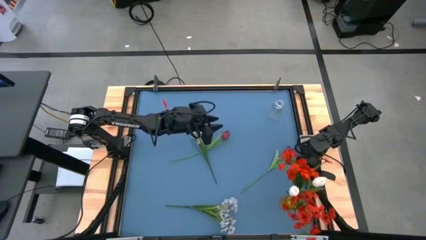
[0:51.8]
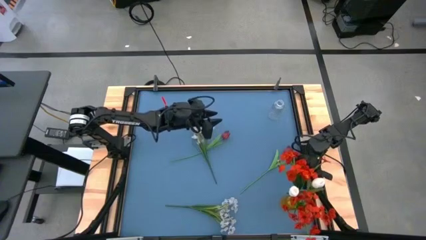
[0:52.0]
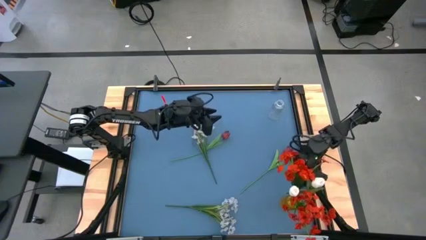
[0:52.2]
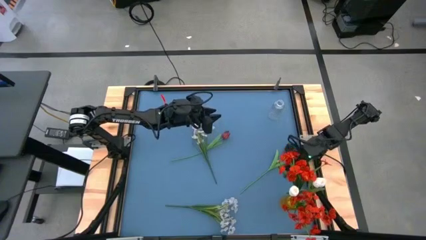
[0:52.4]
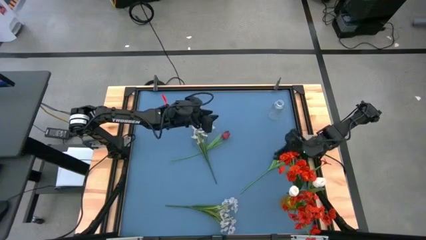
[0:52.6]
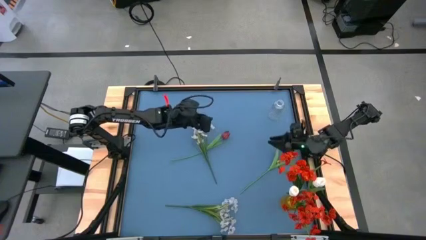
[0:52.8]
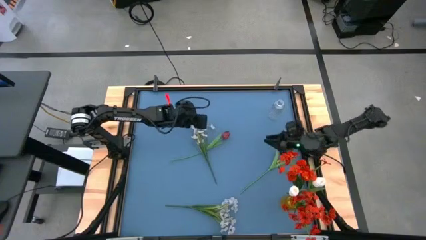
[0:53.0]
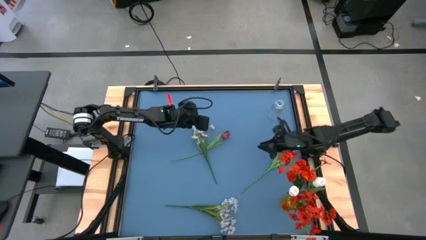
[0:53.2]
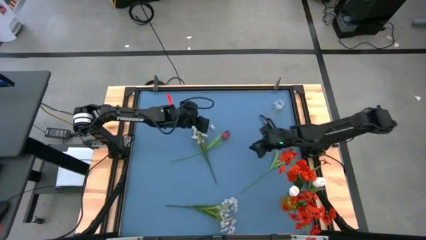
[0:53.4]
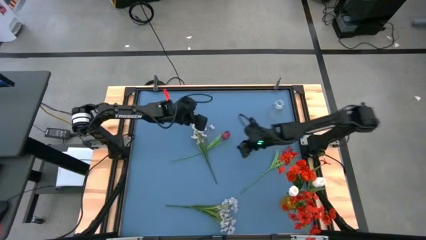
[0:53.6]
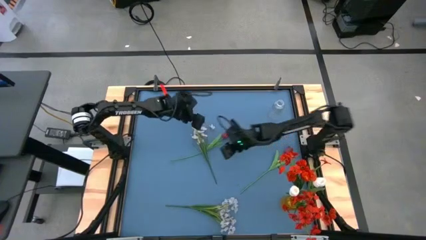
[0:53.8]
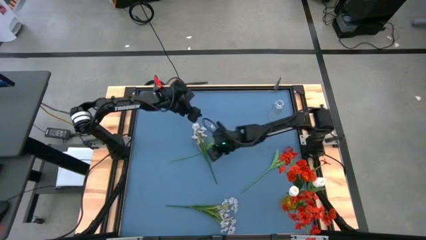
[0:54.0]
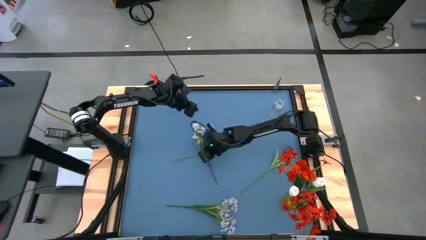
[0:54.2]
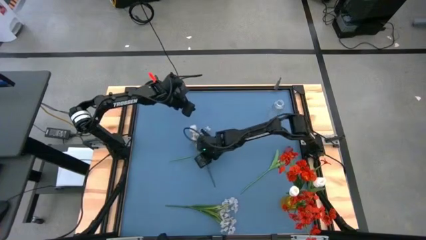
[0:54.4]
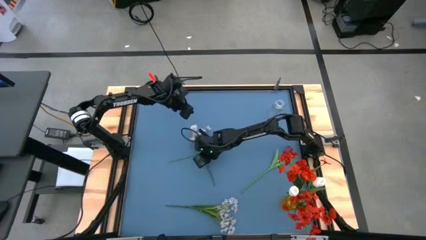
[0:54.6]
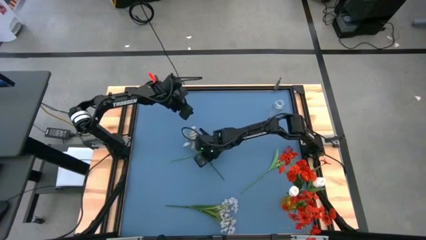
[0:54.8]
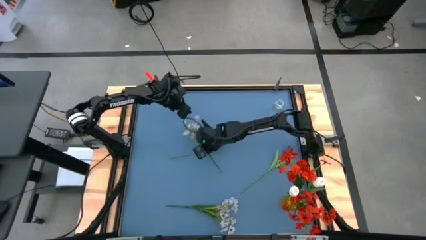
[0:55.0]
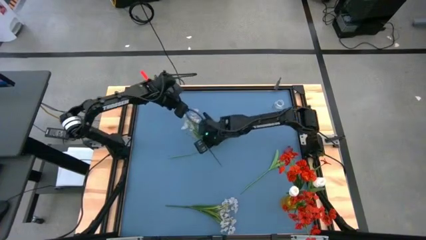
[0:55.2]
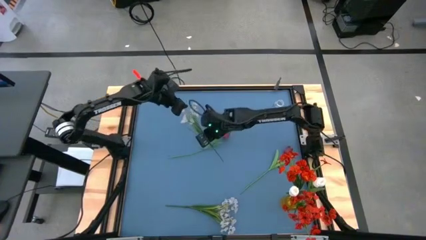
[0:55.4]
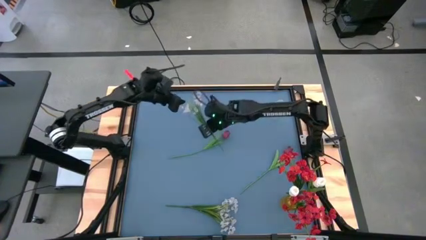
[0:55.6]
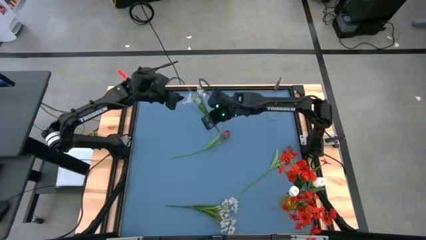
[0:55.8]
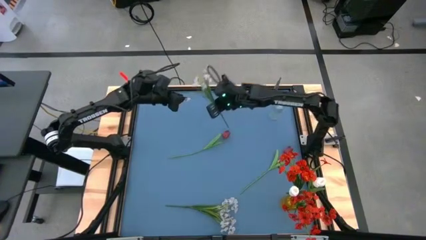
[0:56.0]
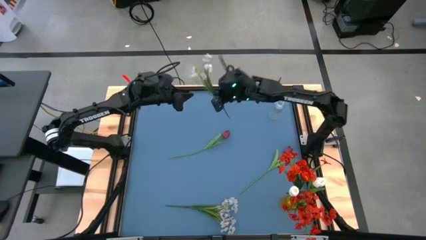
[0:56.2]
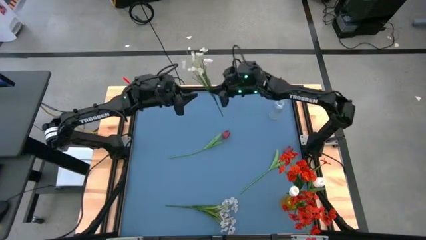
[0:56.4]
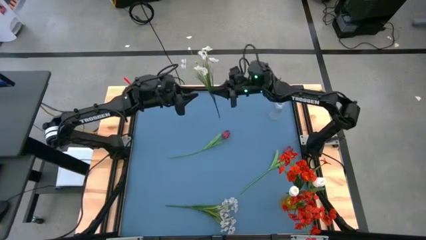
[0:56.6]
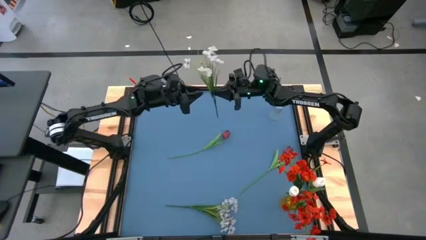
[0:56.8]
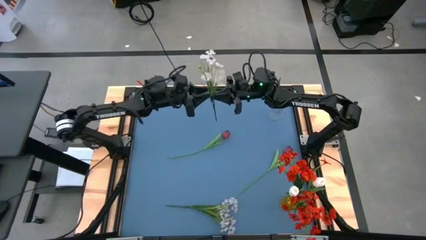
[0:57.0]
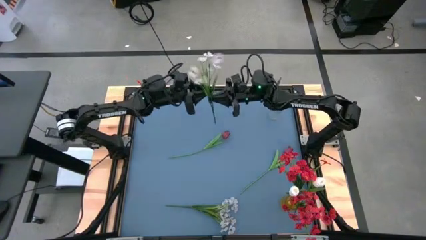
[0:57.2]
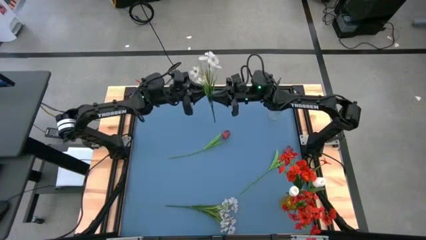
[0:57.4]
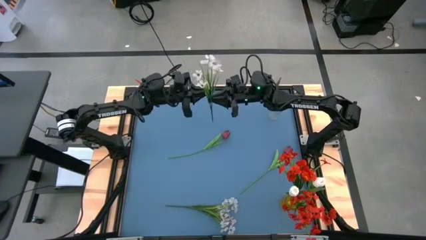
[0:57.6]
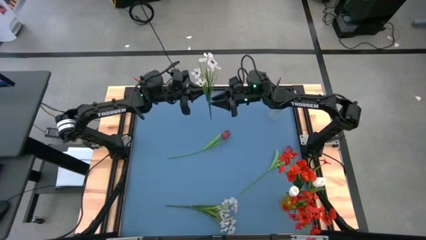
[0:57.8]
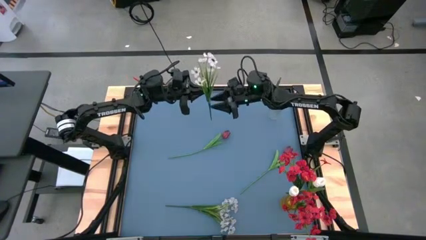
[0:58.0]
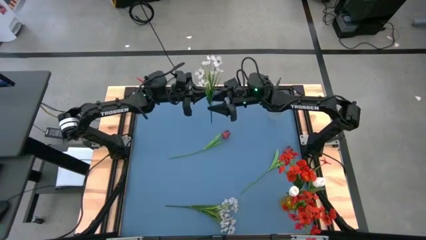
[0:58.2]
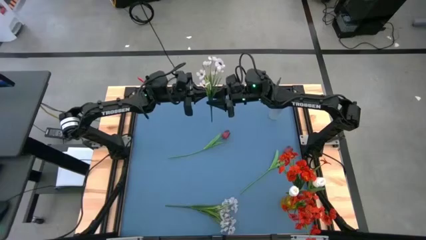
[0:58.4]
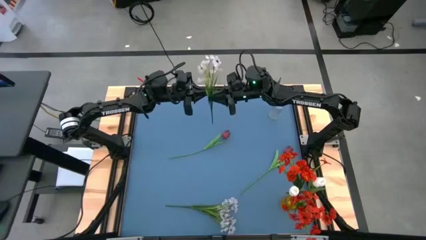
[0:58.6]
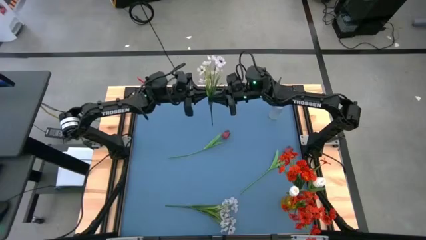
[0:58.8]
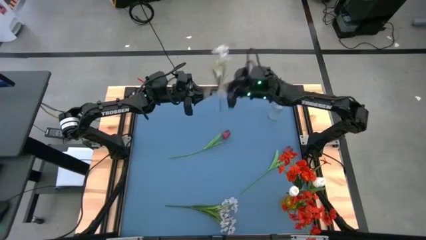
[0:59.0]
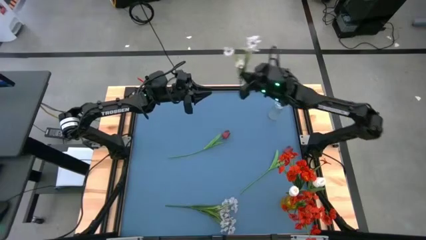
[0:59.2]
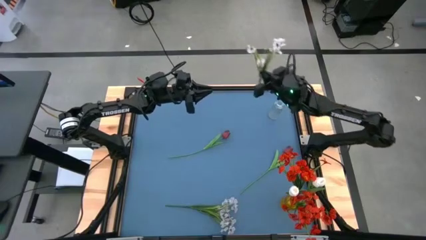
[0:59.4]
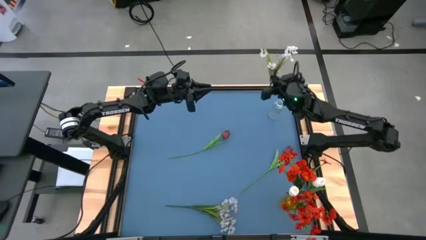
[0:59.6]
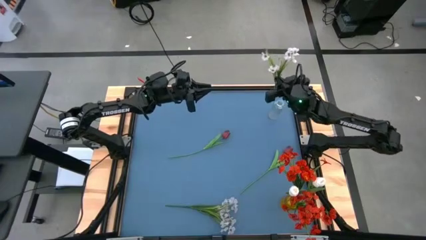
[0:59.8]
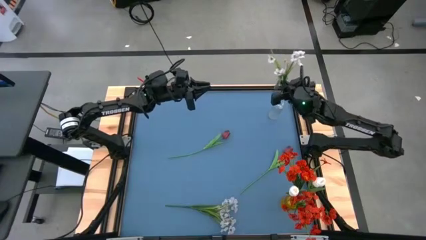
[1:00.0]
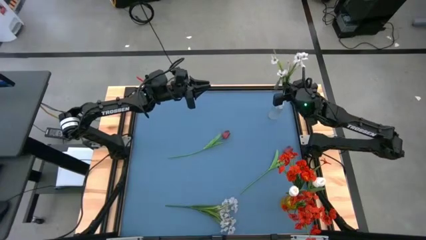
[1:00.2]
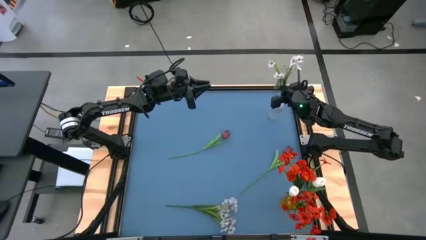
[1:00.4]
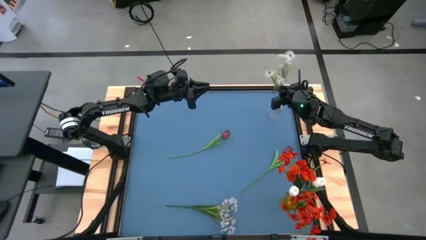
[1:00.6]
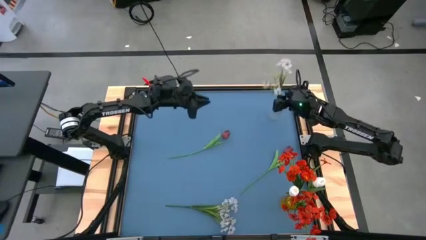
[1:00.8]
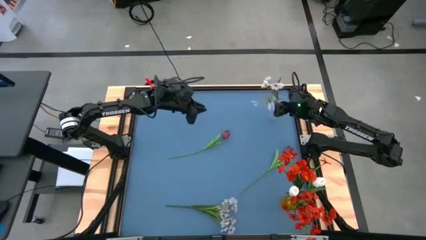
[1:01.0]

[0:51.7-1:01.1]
Task: Sort flowers into vase by color
Put the top white flowers into the transparent vase

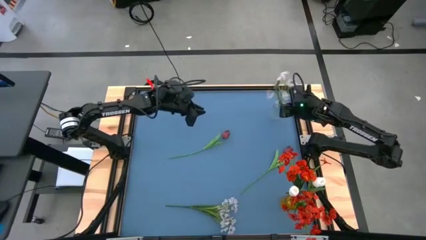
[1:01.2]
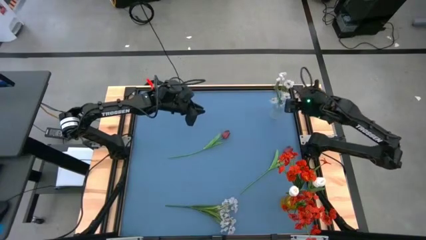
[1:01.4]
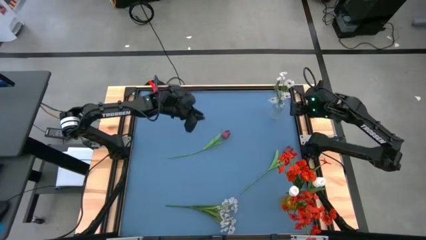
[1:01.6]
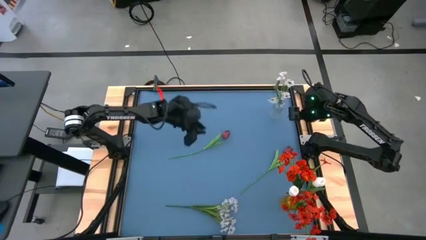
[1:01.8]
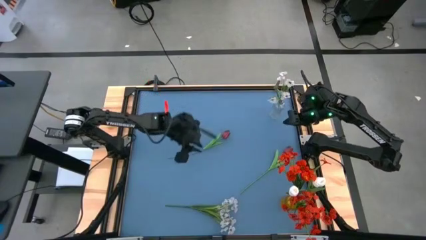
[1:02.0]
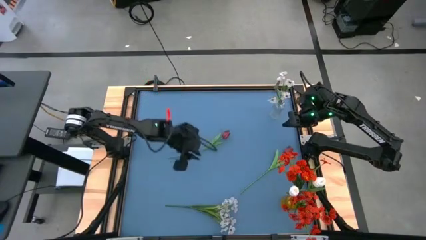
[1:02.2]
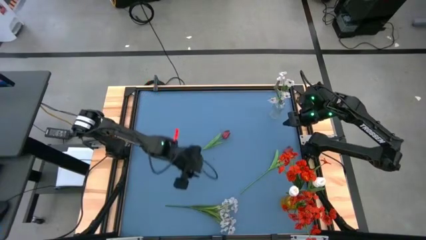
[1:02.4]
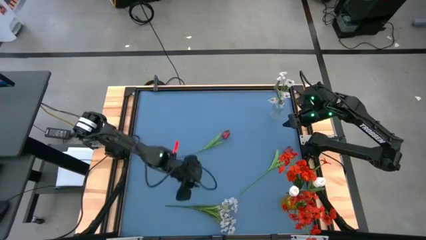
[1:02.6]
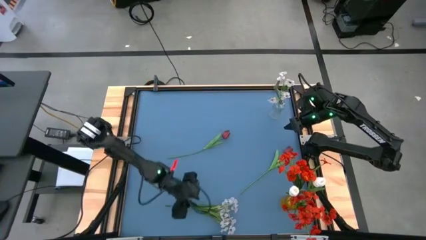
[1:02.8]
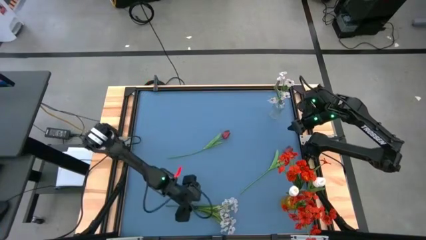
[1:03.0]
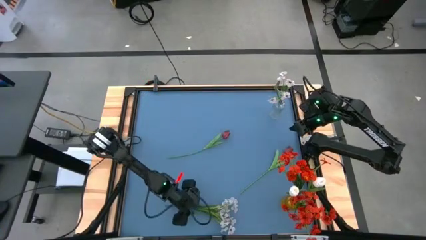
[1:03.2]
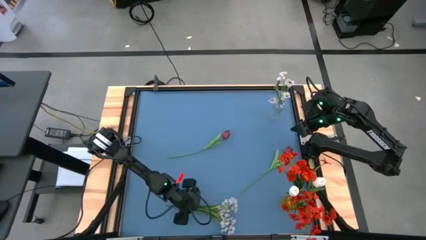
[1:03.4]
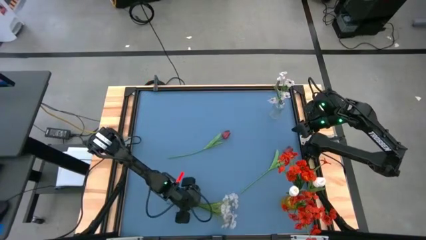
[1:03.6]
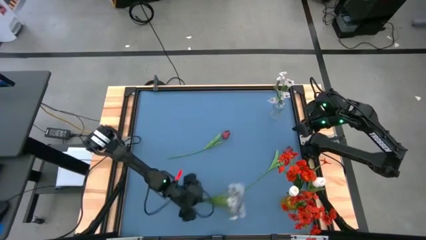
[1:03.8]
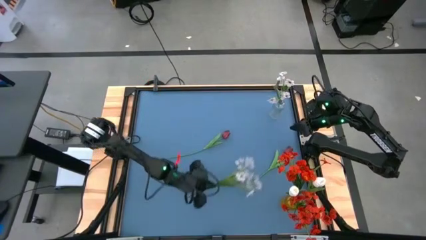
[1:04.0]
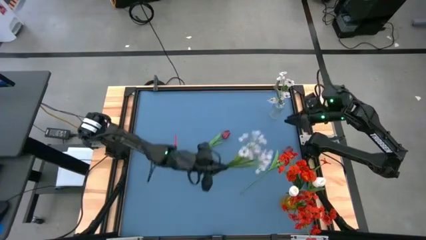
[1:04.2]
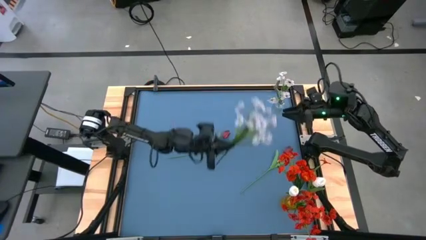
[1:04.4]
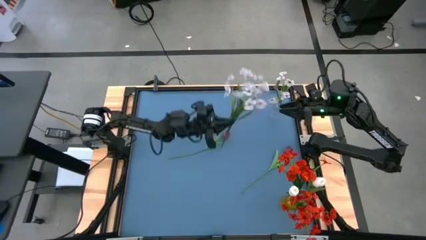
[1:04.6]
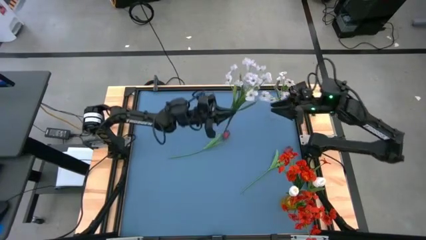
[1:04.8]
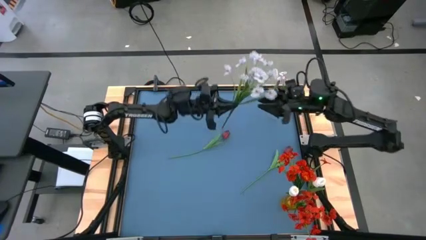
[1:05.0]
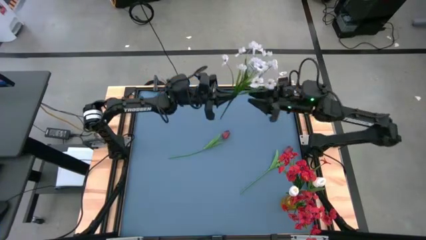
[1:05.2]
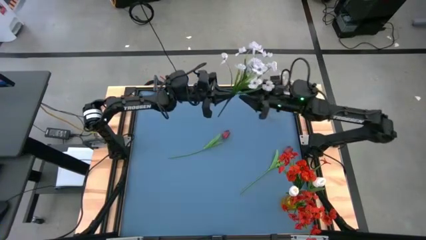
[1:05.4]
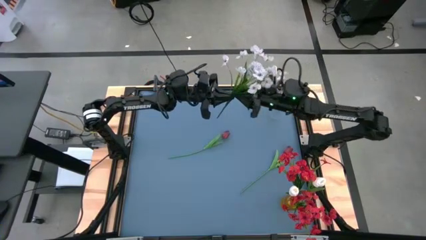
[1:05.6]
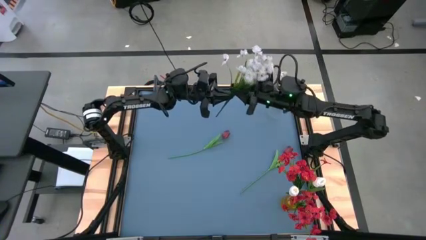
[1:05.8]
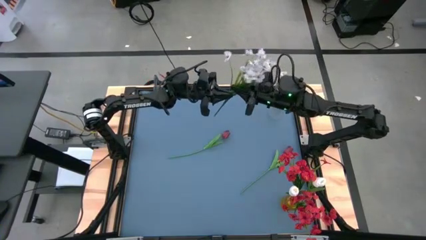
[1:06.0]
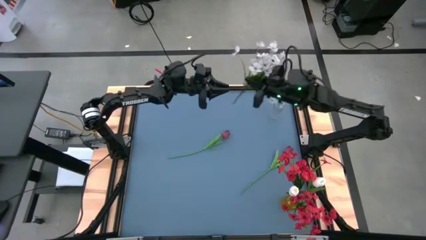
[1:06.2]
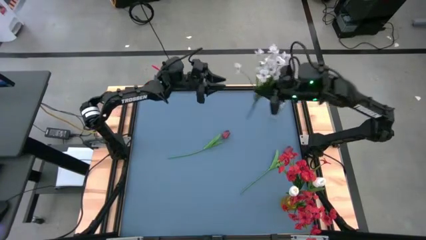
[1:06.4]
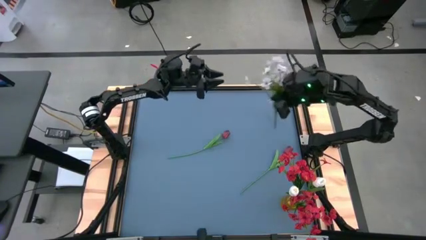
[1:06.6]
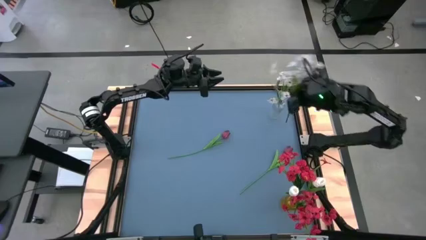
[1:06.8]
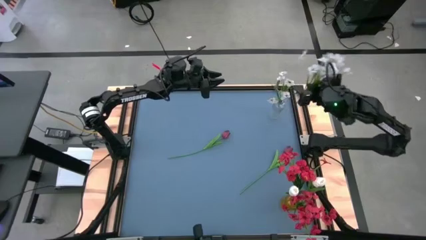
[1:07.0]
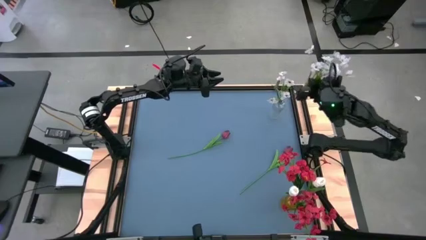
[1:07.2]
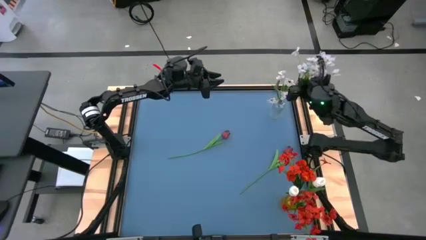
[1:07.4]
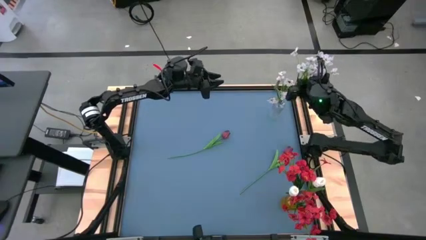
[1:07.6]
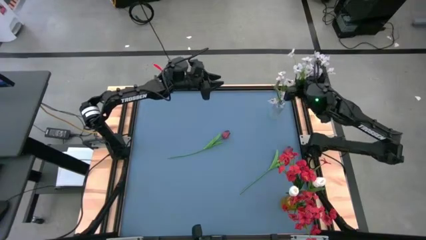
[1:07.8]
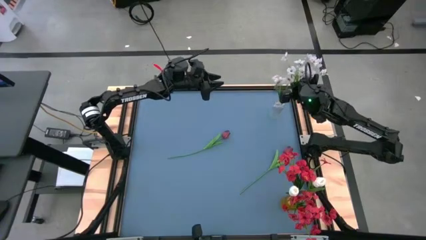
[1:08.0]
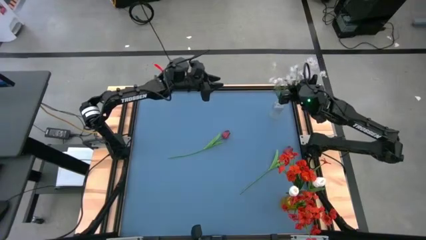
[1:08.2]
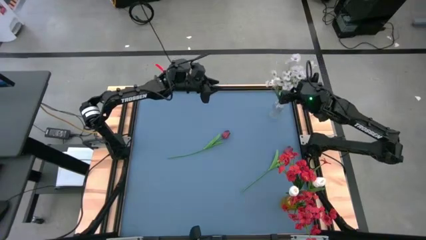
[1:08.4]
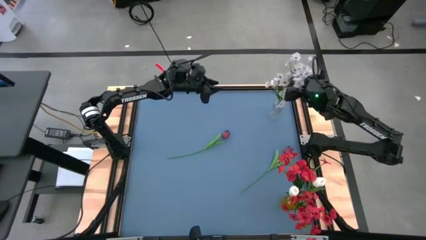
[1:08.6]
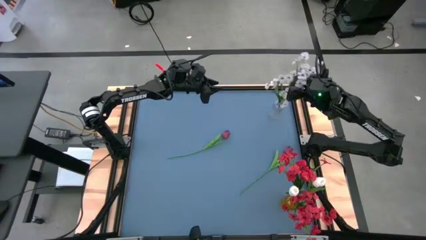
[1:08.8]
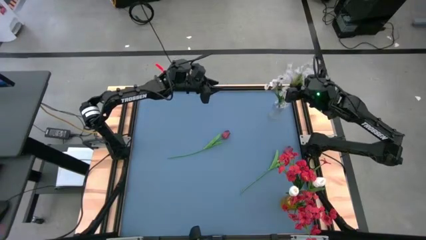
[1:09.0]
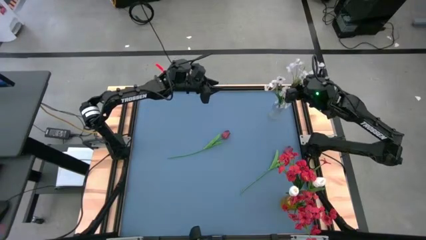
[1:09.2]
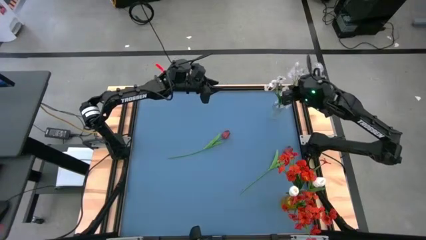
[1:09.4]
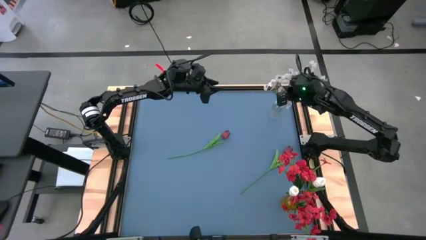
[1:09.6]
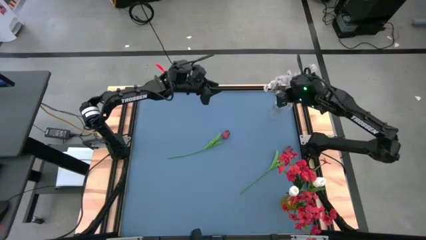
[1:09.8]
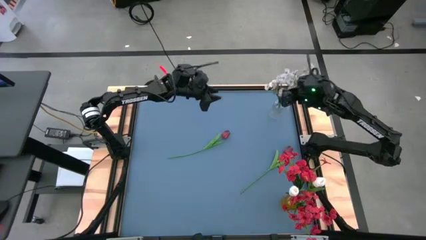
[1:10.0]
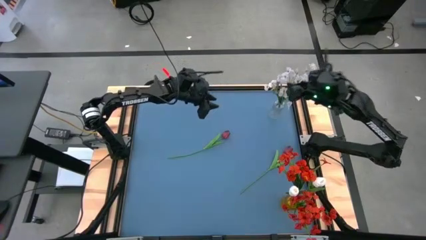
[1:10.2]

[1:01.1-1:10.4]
Put the white flowers into the transparent vase
